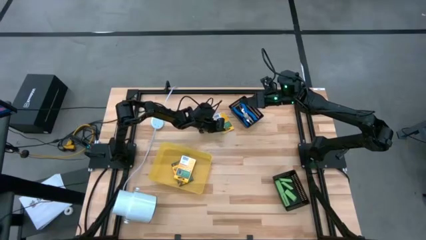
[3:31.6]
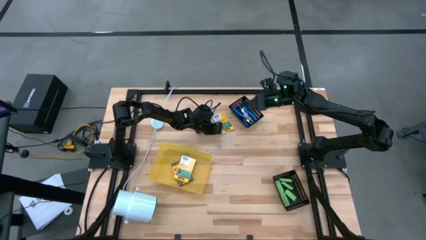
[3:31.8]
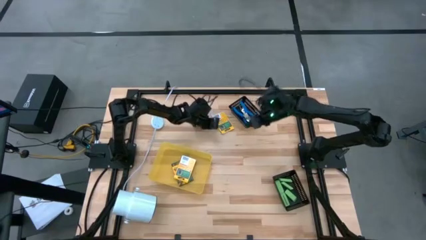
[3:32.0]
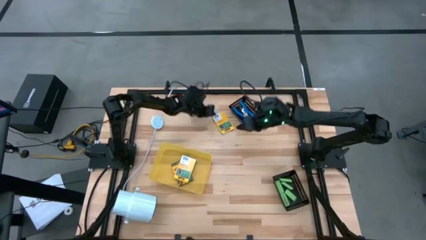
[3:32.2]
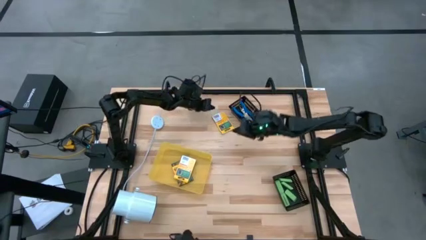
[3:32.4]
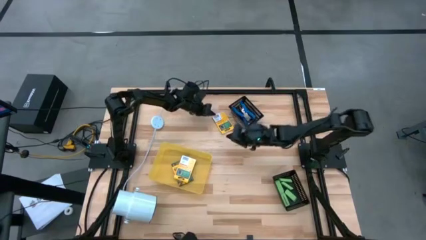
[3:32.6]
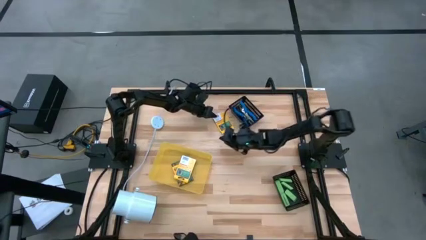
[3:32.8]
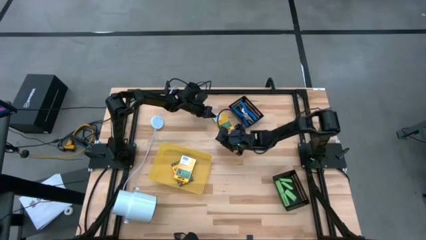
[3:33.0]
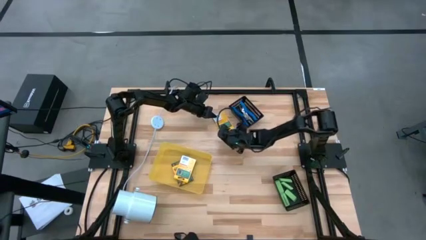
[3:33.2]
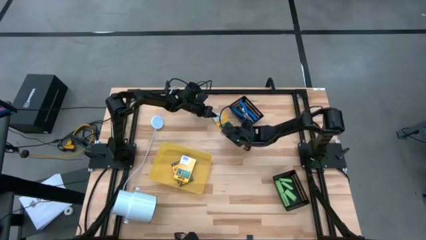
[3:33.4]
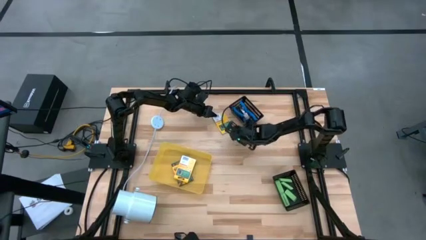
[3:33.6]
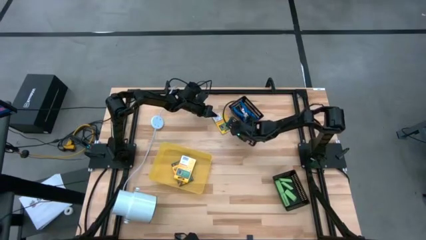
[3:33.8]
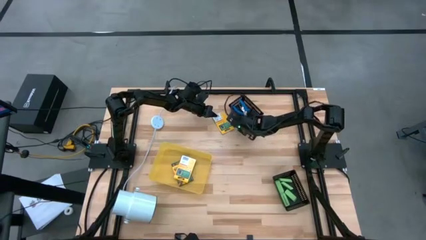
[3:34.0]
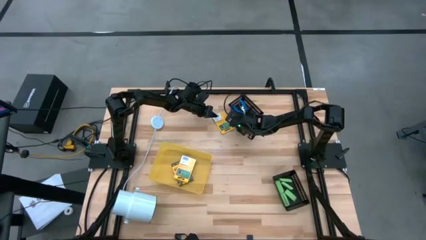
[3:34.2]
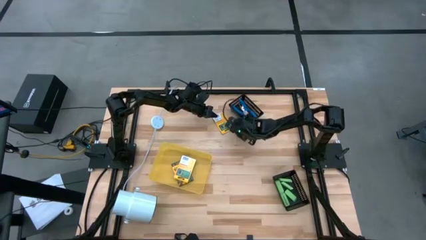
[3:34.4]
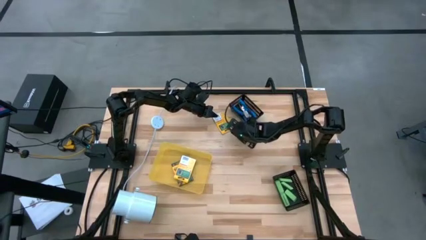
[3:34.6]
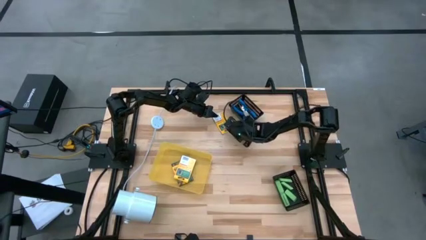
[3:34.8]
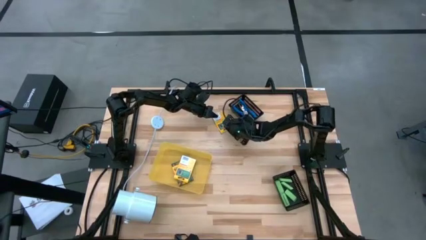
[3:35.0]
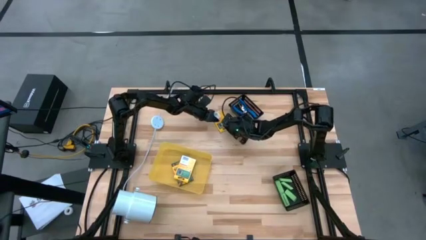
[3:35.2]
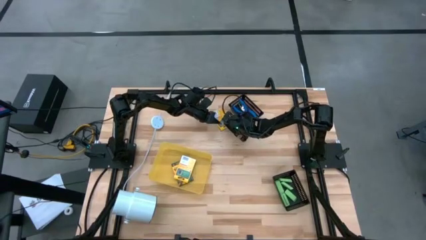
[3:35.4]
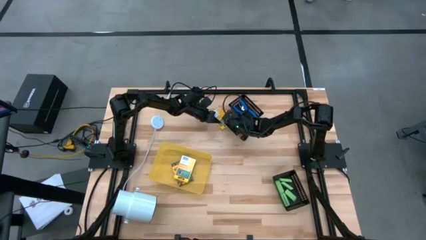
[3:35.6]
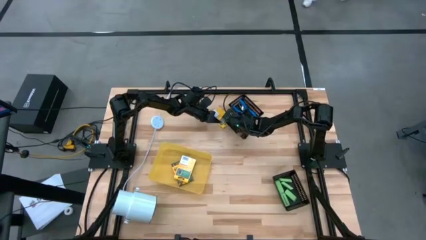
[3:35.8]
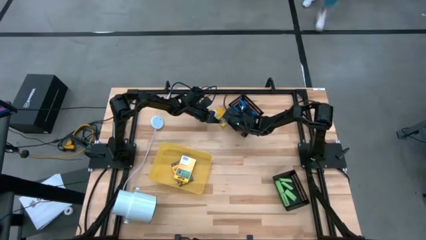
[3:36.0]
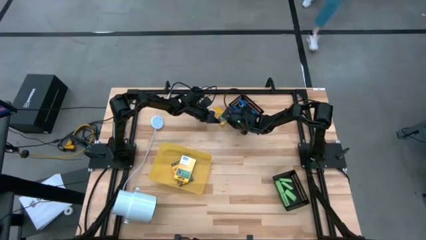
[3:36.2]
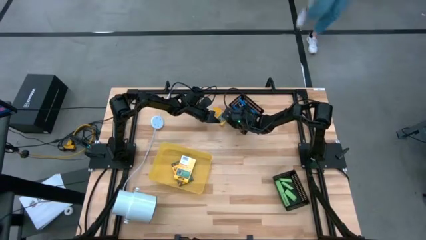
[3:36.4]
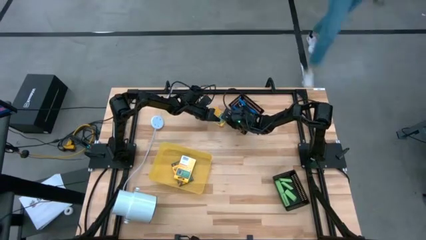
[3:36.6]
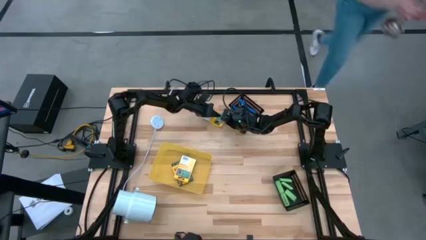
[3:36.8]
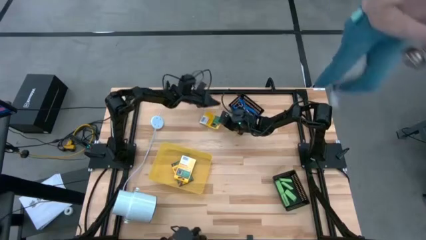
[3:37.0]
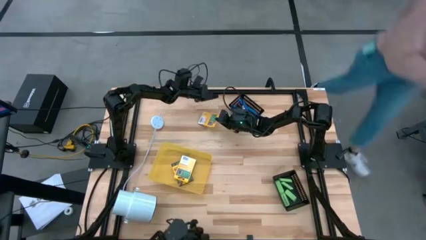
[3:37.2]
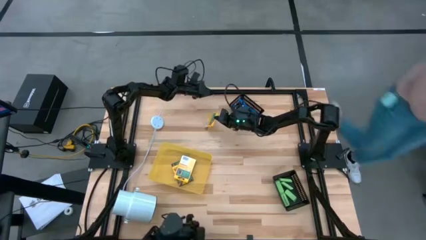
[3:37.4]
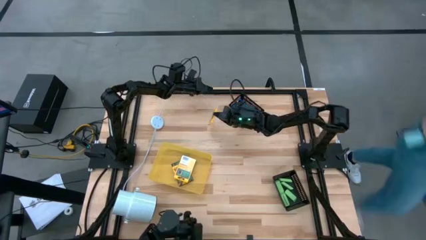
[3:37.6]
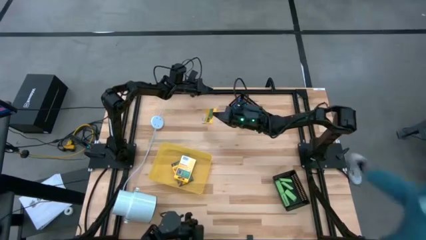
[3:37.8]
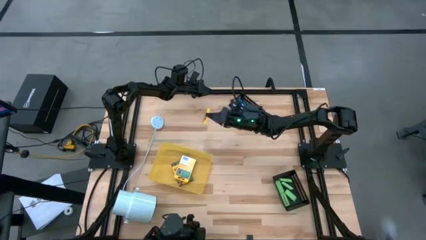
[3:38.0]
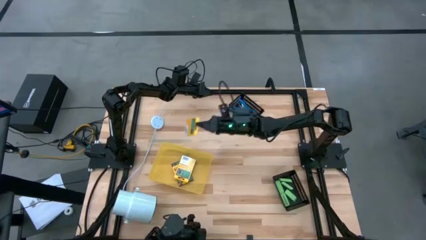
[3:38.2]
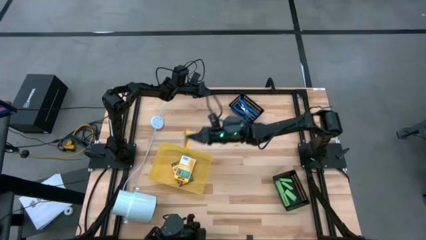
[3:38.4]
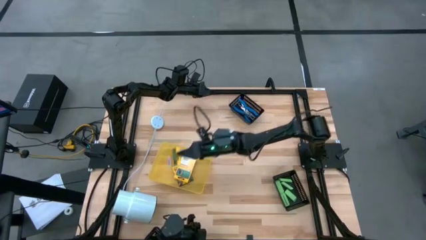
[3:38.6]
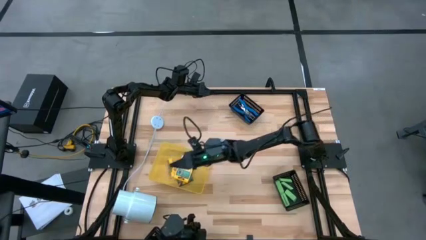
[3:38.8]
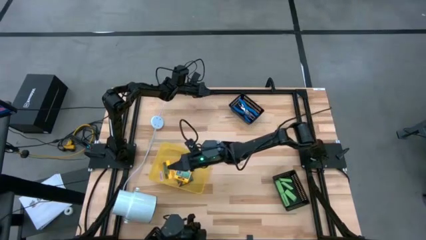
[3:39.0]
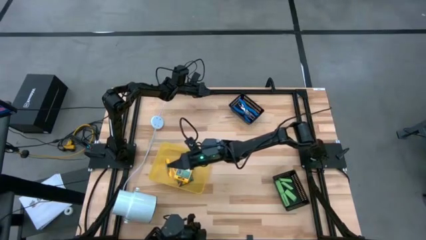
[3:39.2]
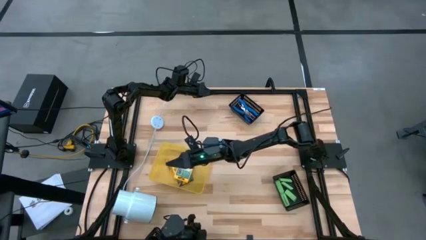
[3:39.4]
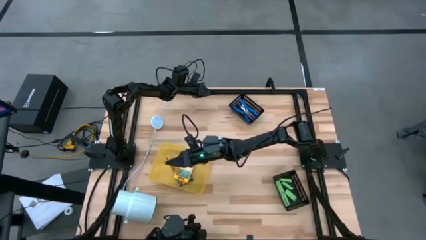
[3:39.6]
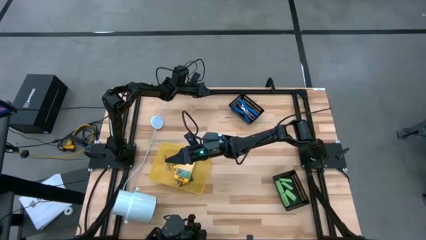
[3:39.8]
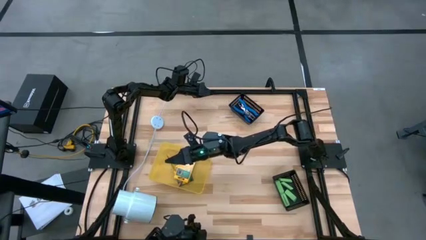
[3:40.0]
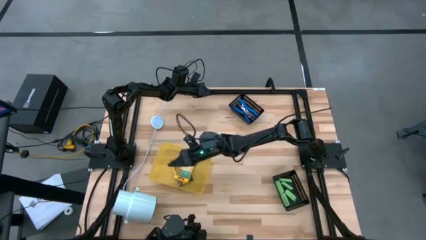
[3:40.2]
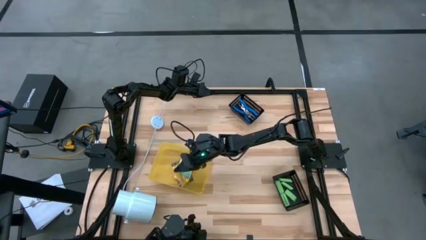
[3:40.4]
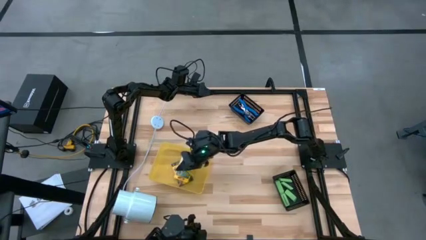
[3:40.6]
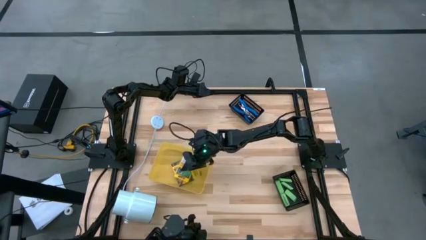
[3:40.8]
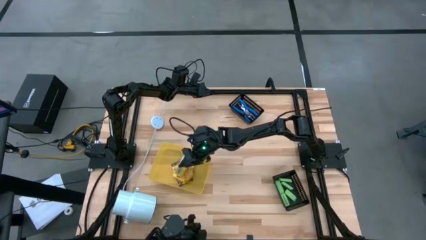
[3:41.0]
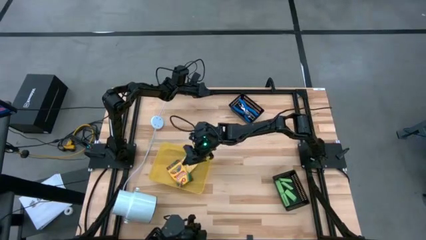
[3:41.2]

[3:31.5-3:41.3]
Task: Pick & Place School Supplies
Put the pack of crayon into the yellow bin

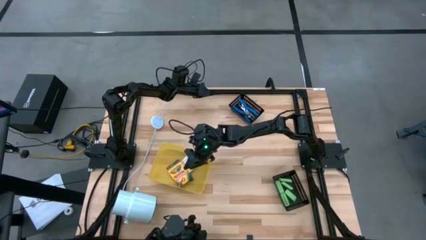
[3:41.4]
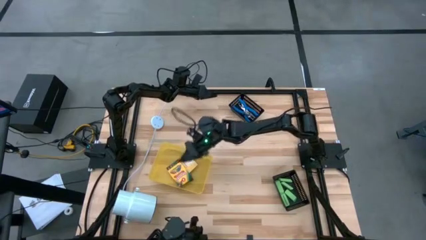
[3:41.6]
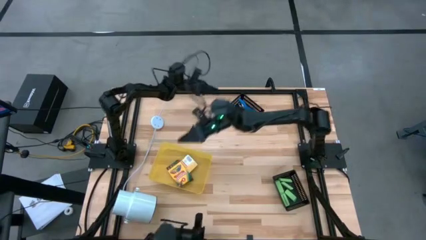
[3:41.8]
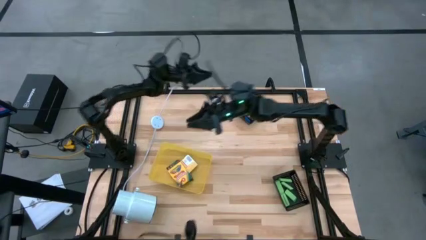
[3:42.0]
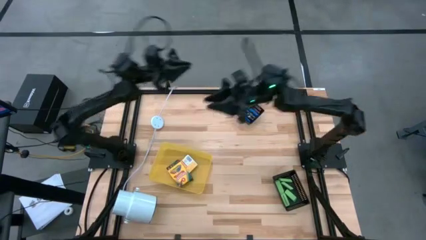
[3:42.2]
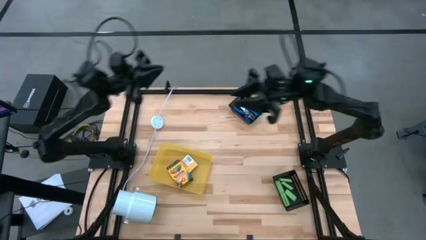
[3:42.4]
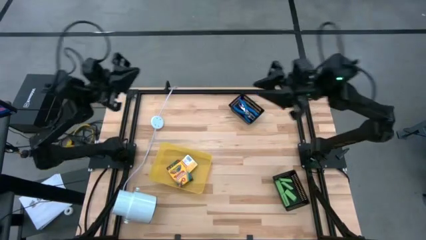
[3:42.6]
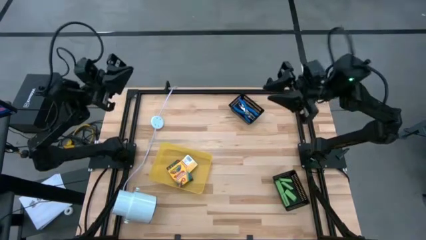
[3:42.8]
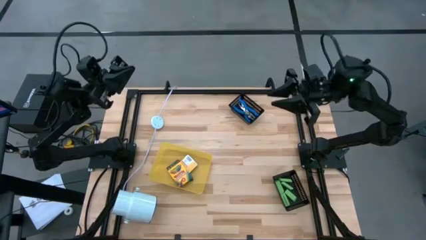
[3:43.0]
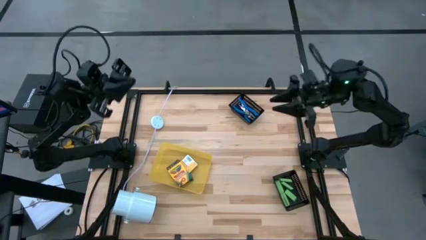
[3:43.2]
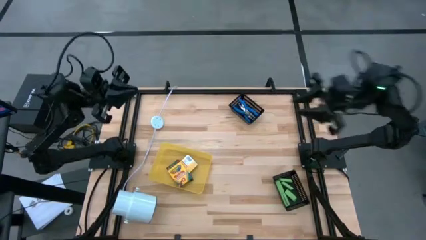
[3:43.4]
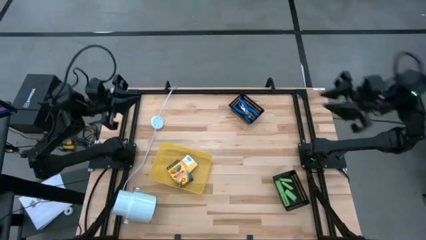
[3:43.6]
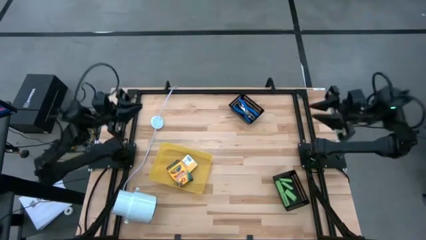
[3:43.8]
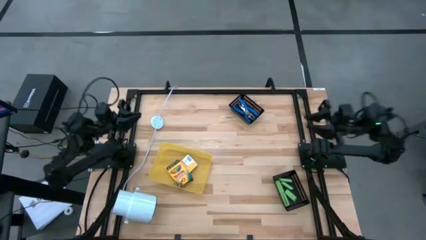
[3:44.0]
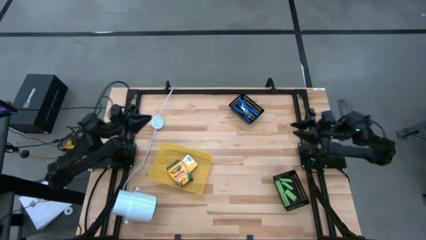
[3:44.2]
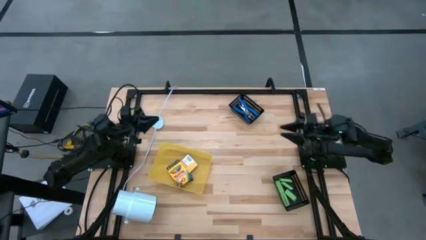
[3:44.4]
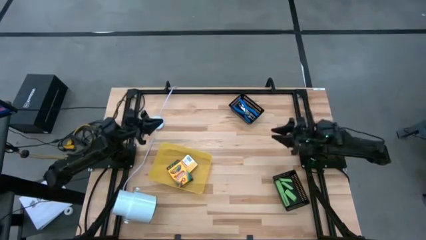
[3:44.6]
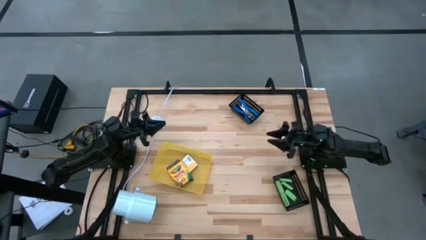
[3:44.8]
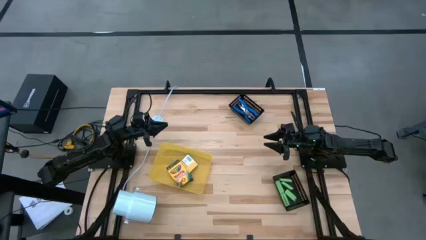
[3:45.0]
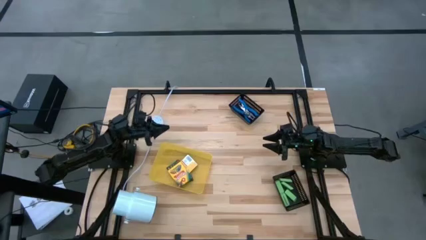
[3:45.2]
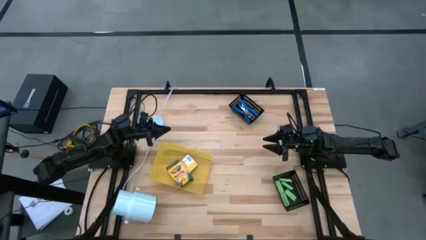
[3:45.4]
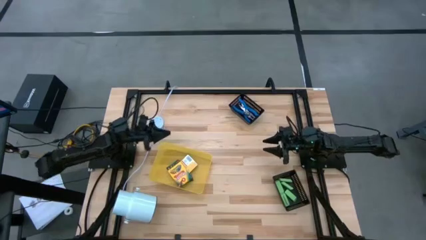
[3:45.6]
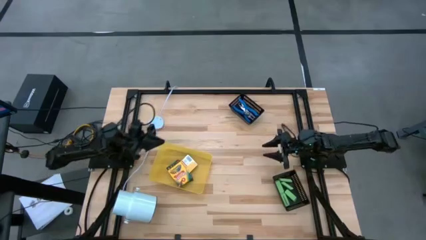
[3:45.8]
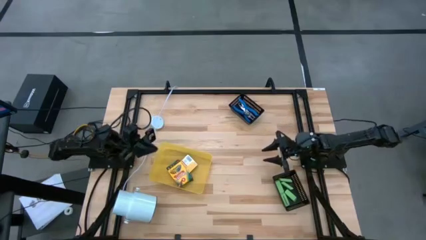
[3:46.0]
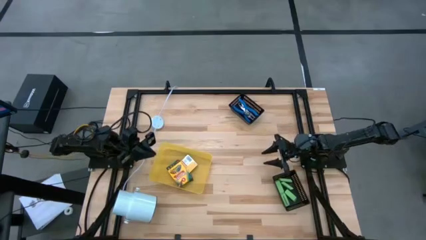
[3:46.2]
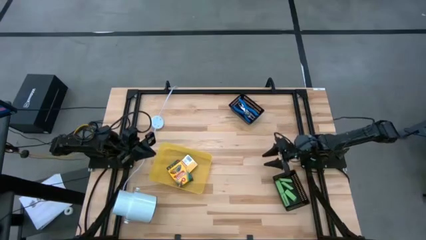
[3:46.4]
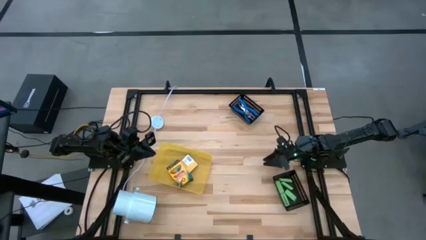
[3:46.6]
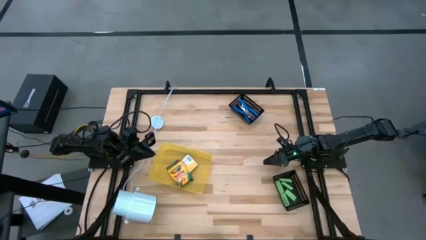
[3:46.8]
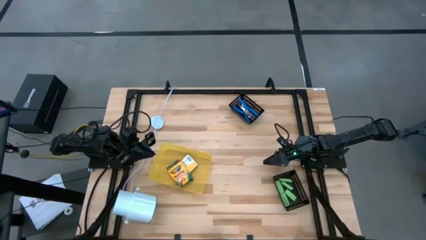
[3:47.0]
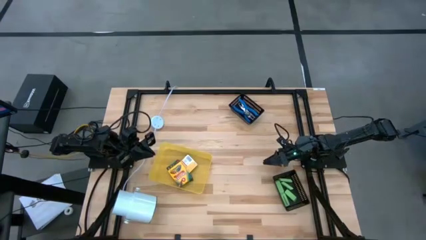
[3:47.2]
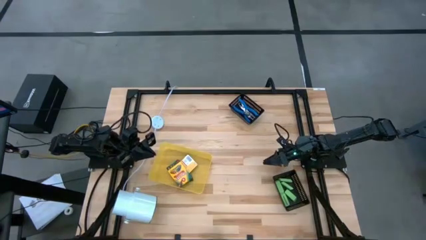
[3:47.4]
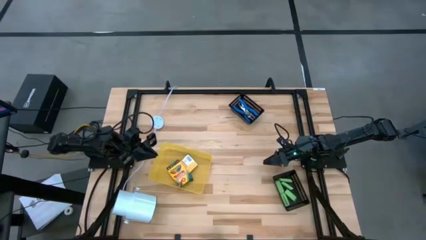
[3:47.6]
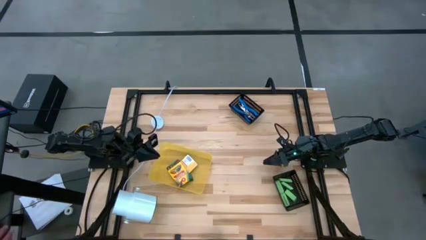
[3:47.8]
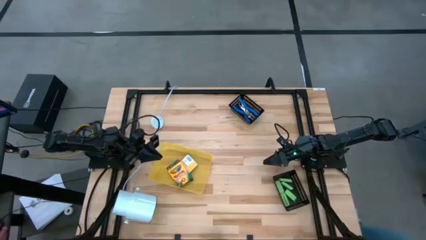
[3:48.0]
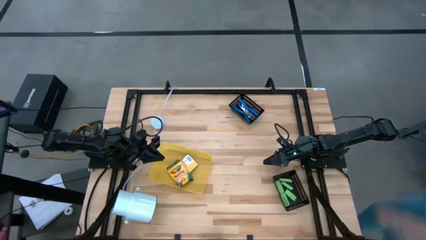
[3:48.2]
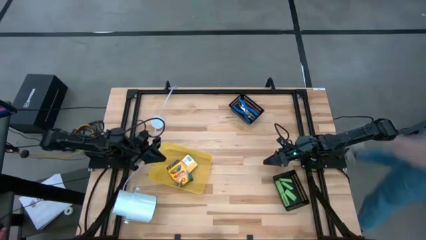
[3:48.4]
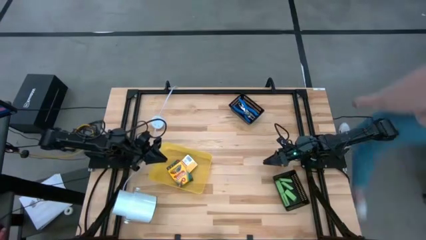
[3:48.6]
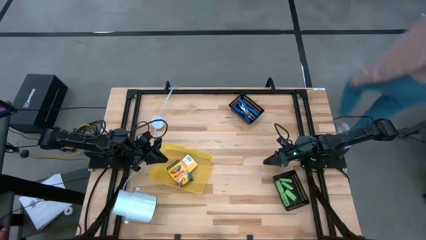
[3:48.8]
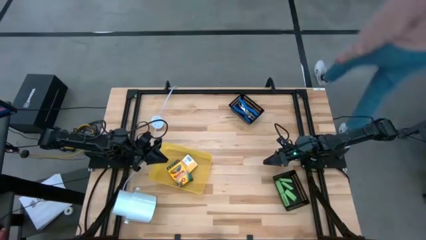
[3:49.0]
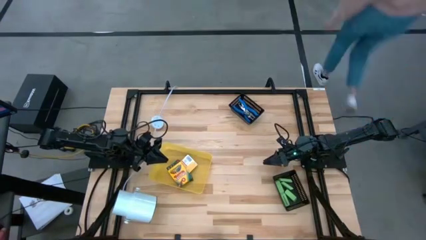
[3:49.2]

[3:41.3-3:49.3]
Return to Home Position
